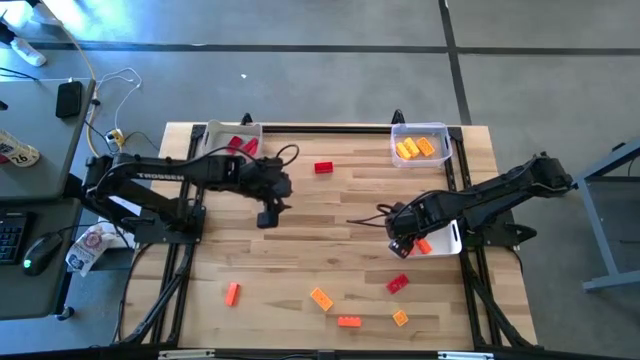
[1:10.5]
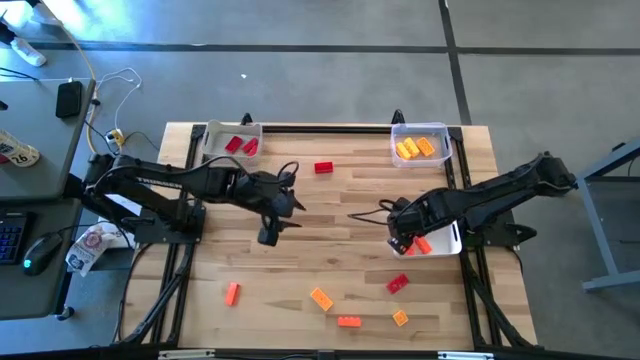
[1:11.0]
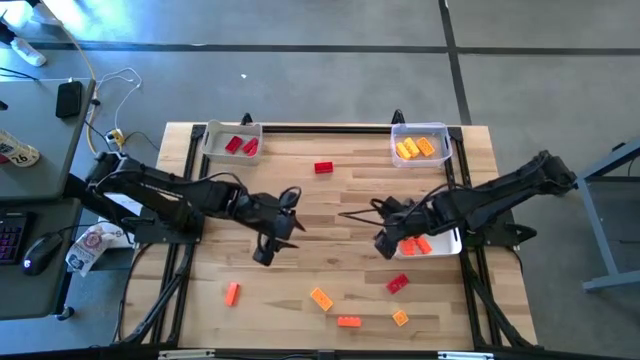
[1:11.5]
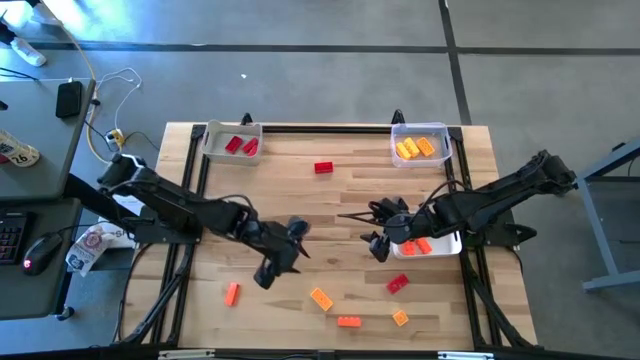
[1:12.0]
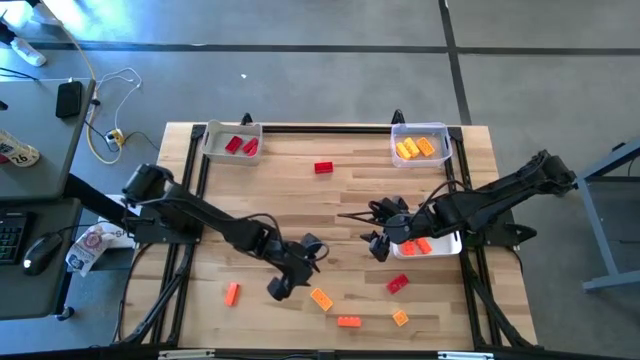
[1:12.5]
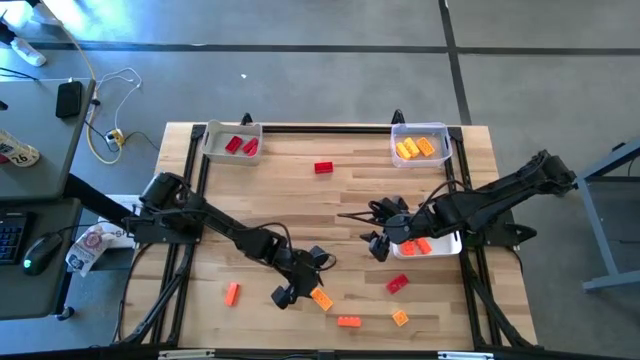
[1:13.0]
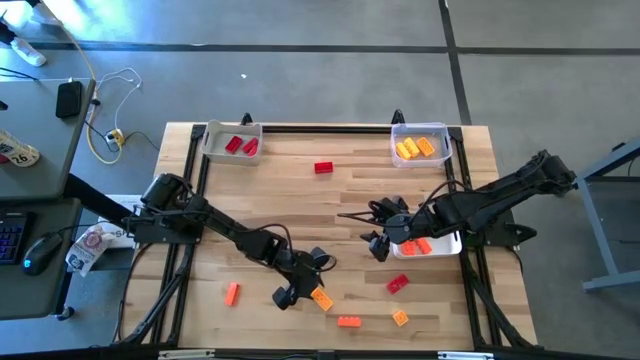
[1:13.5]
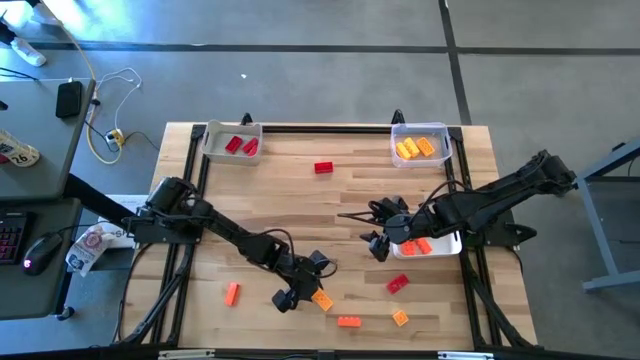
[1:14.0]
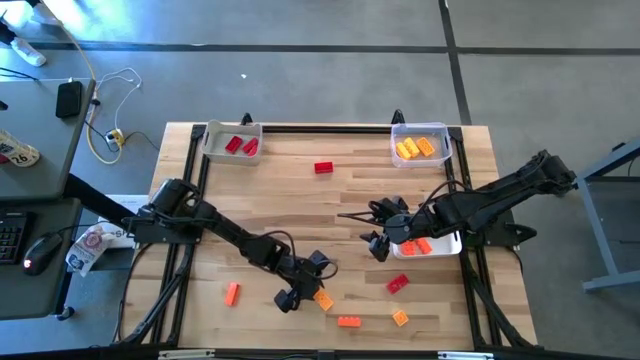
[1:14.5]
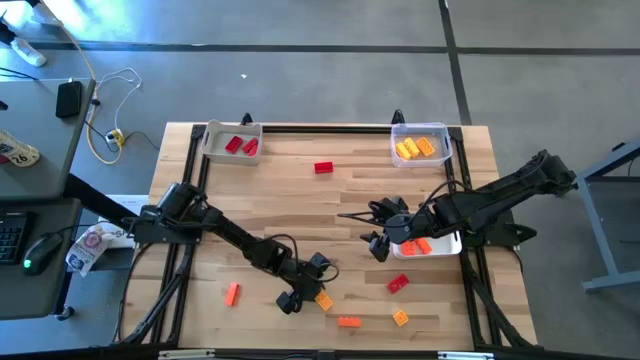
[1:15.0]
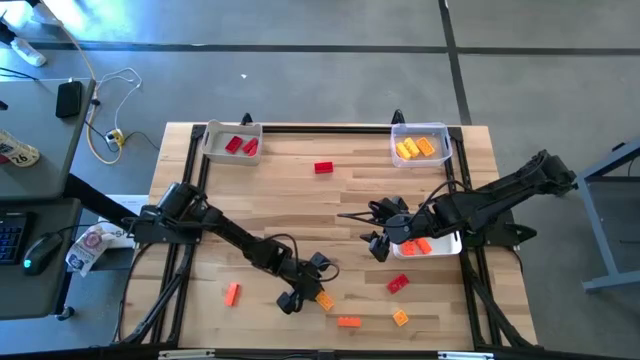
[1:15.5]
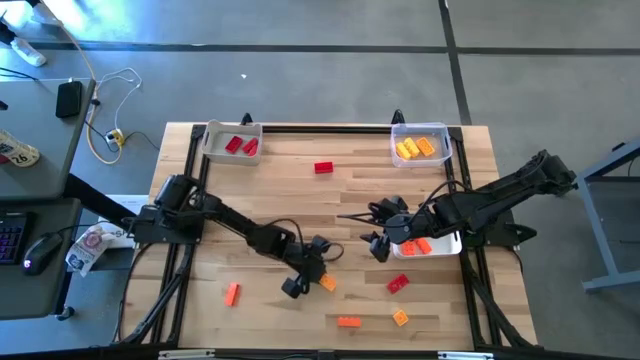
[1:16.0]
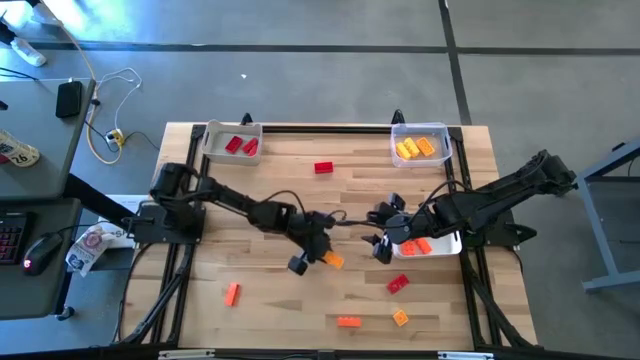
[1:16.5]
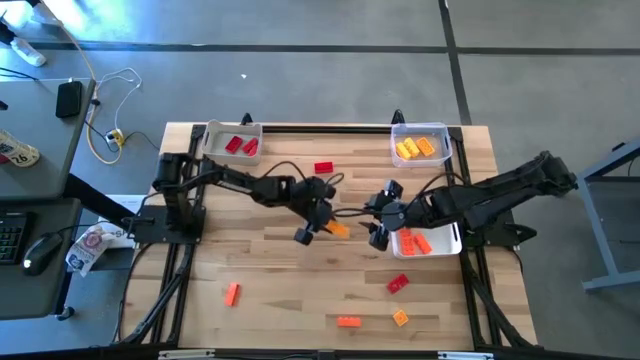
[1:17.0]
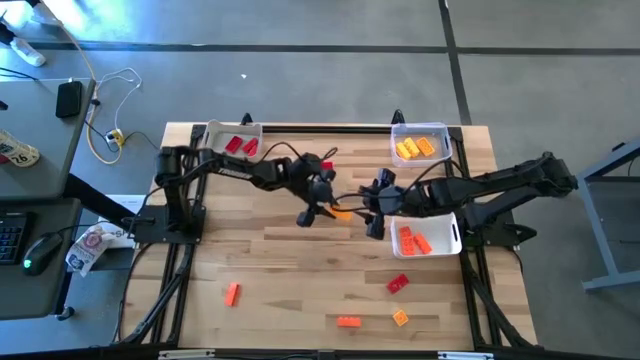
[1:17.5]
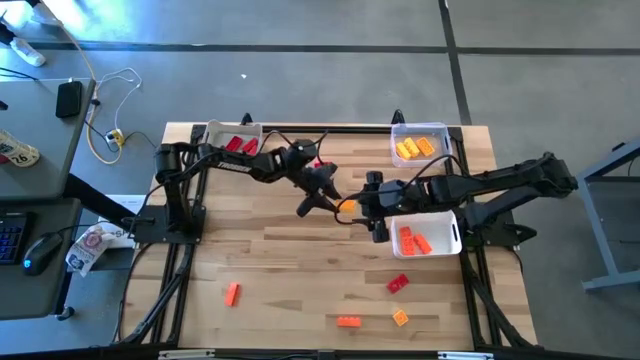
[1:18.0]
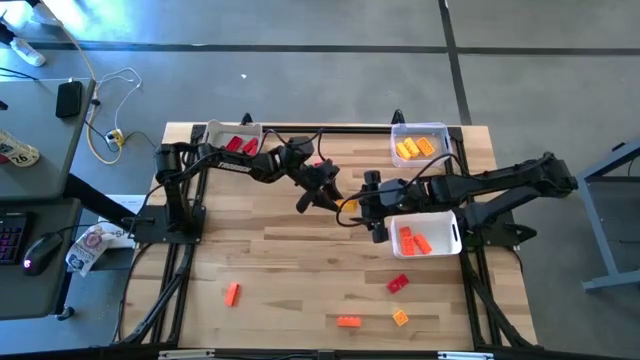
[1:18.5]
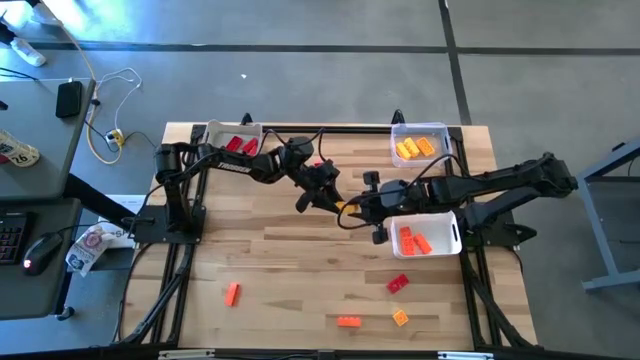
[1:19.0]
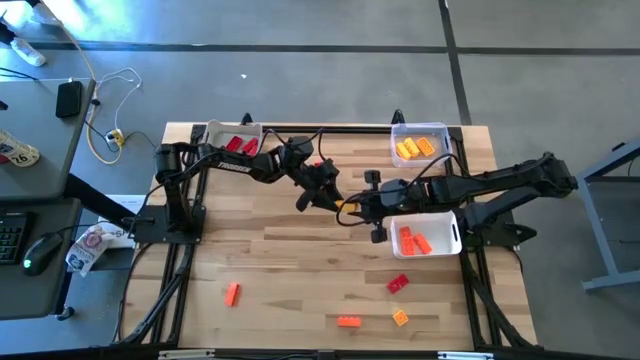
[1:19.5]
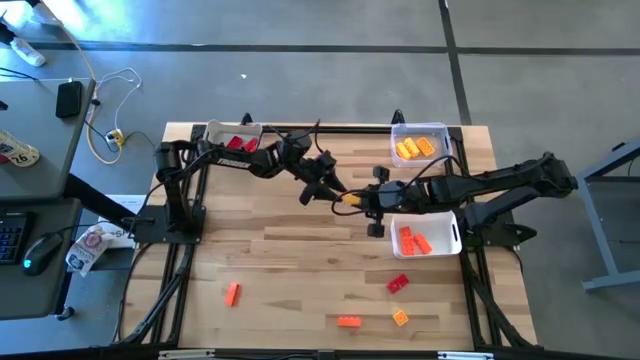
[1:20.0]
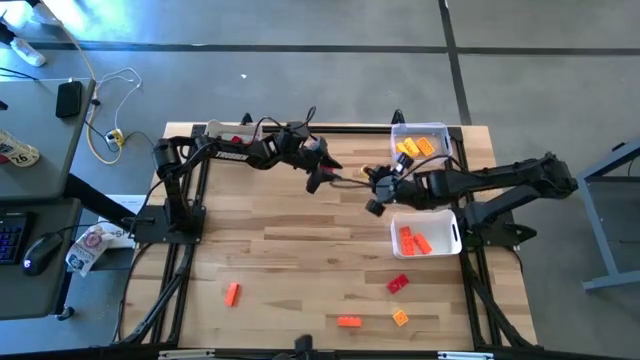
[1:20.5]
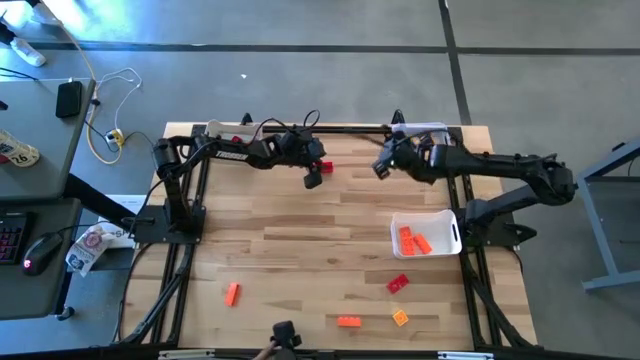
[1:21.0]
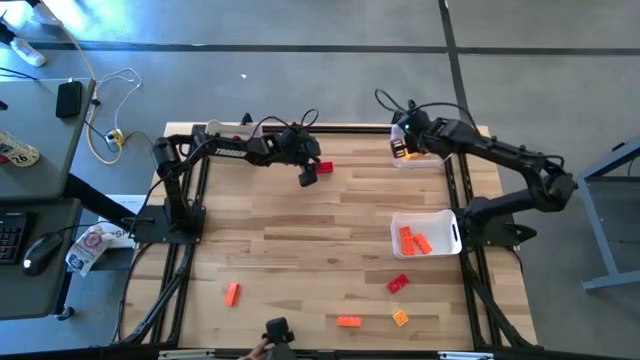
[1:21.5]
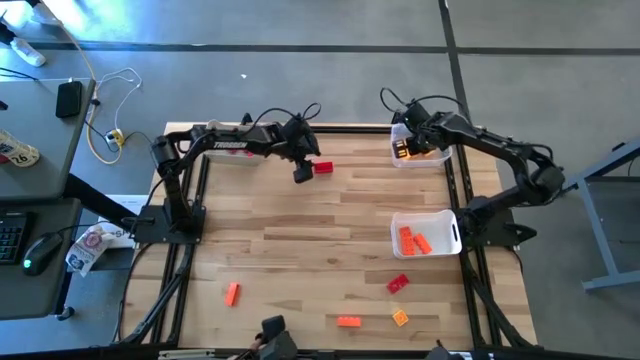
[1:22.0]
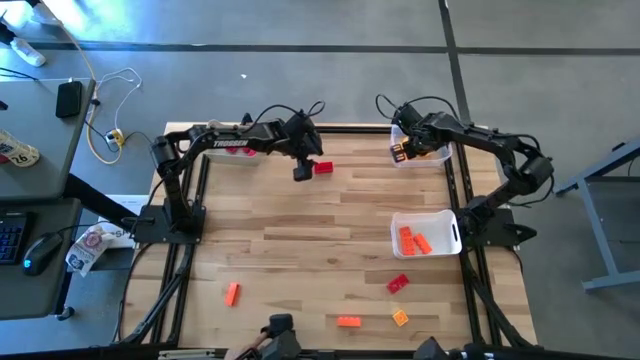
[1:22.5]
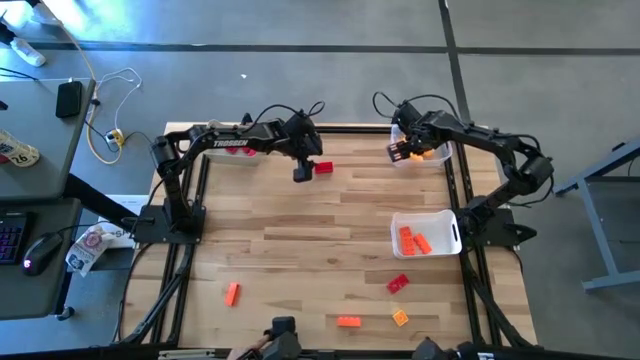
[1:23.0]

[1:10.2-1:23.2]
Task: Sort & place blocks by color
Put the yellow game piece into the transparent bin

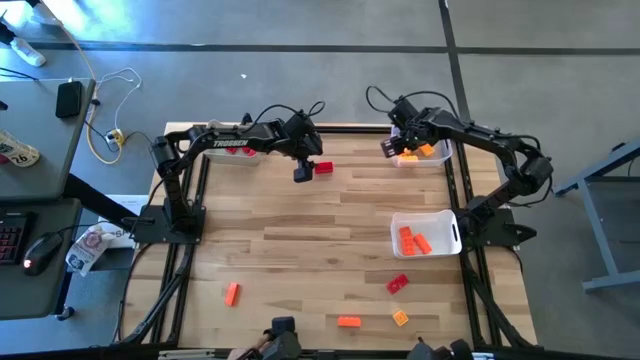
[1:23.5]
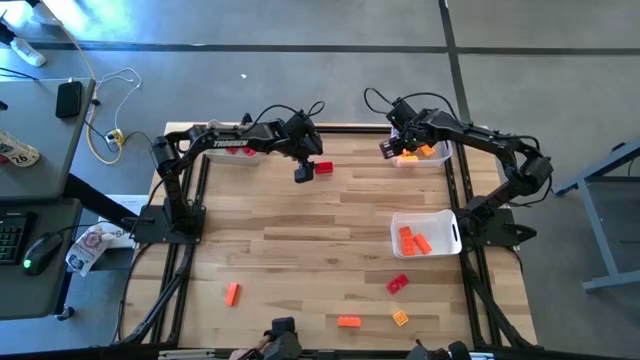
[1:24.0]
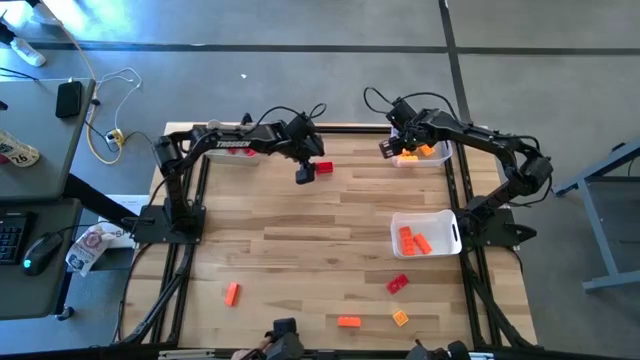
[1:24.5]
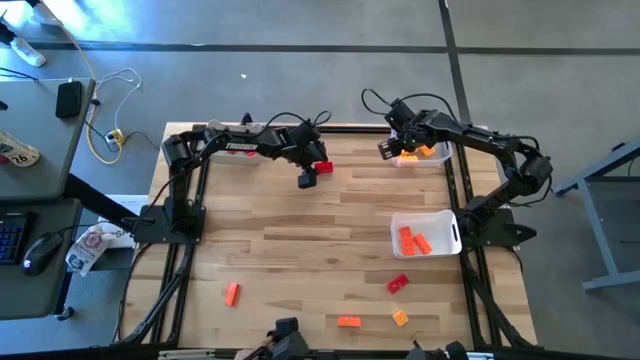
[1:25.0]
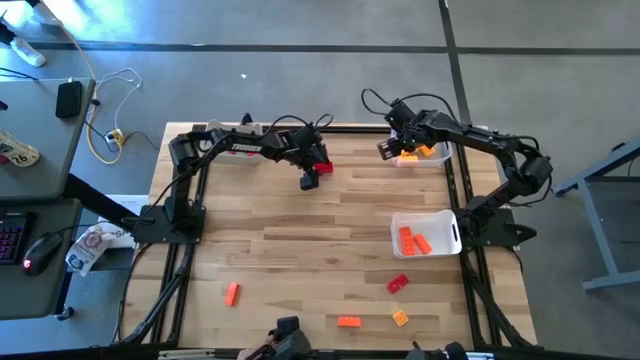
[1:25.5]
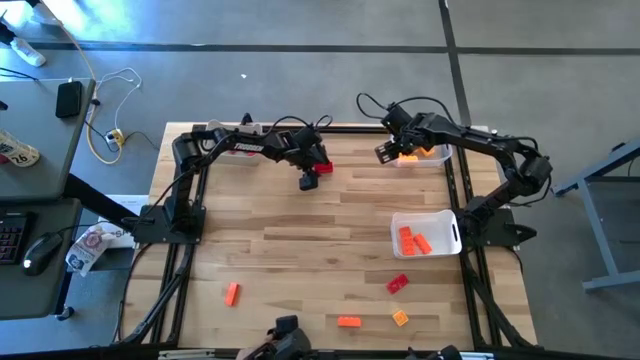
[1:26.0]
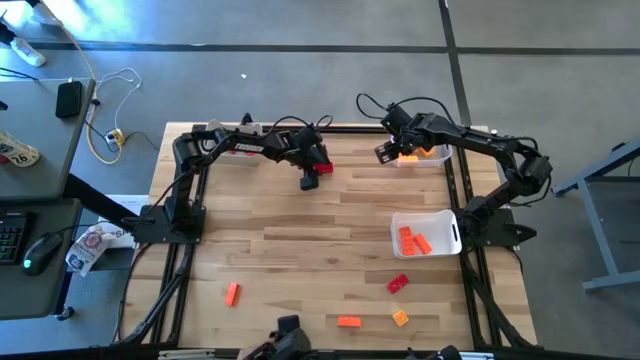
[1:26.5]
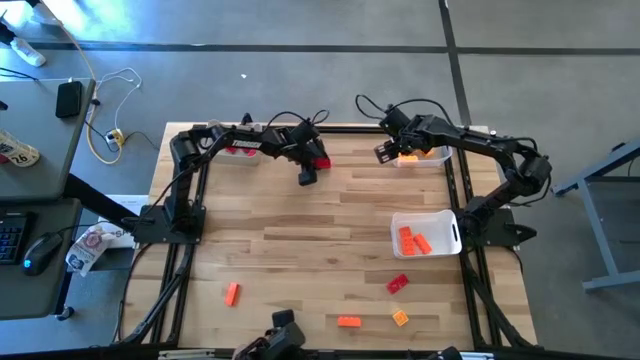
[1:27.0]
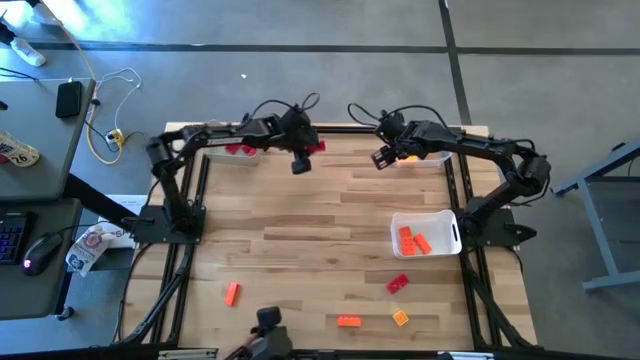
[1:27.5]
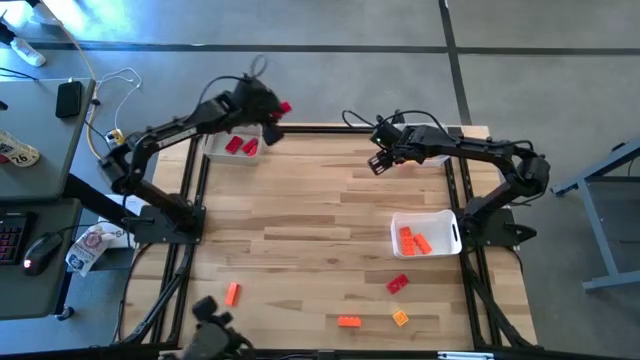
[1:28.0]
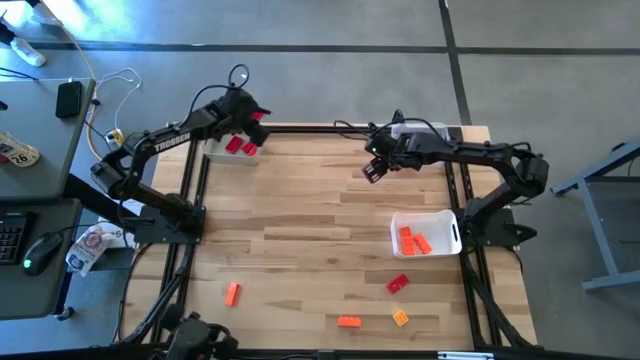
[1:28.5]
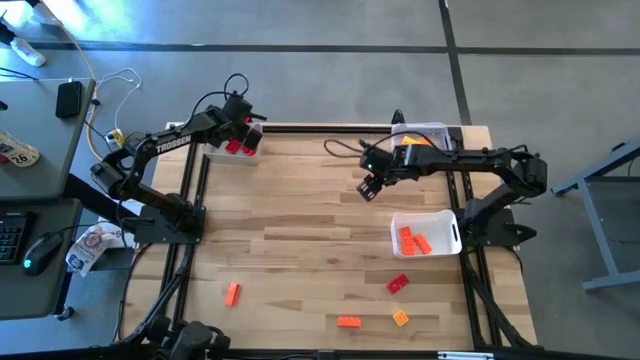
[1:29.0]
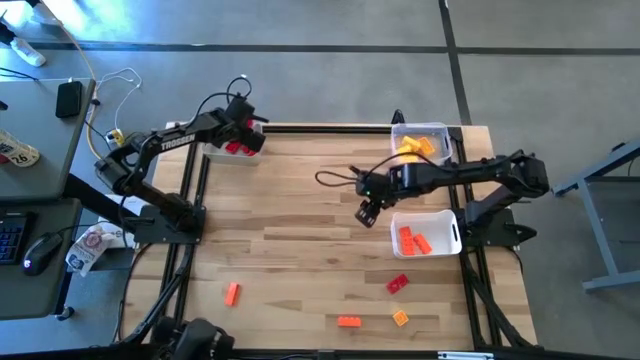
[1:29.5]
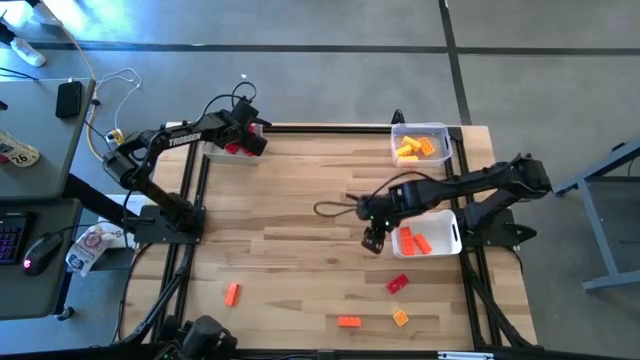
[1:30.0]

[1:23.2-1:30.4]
Put the red game piece into the gray bin

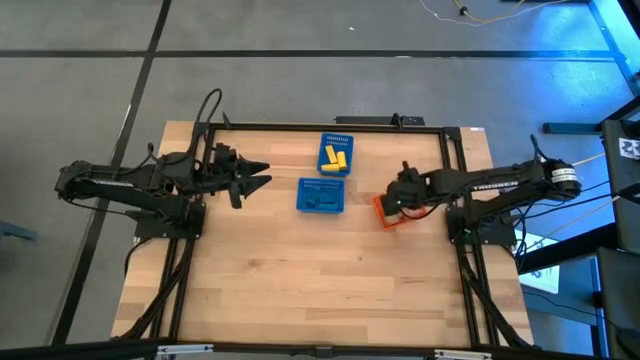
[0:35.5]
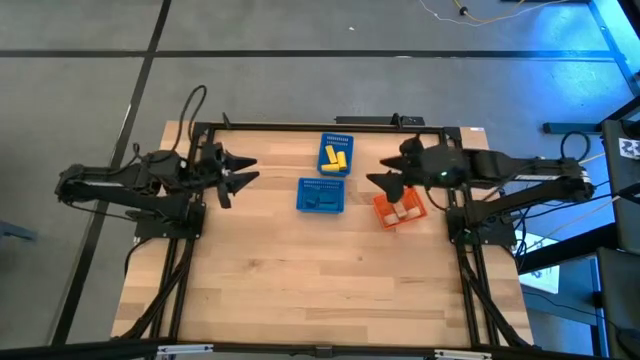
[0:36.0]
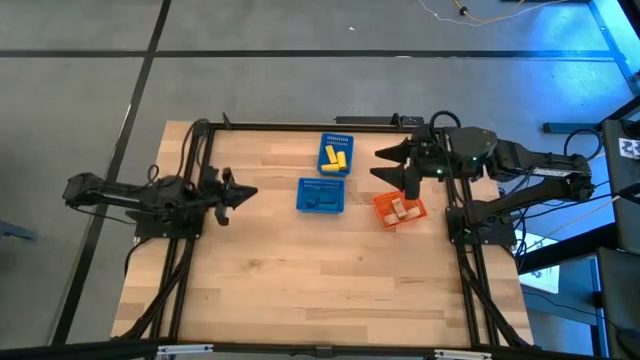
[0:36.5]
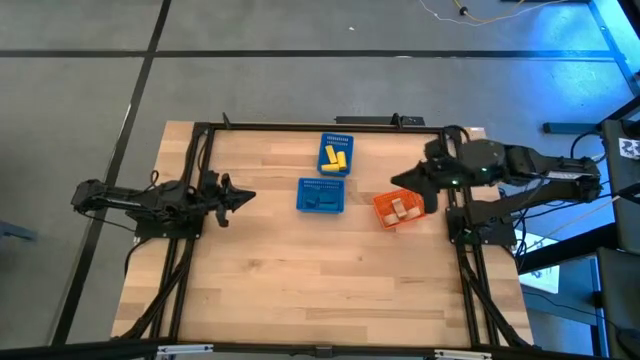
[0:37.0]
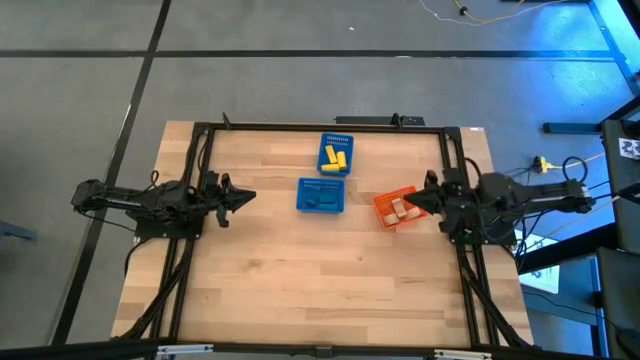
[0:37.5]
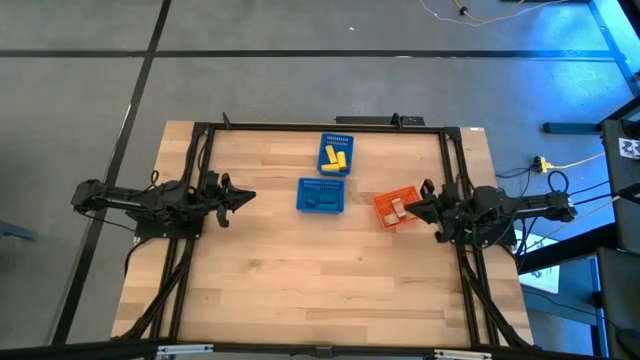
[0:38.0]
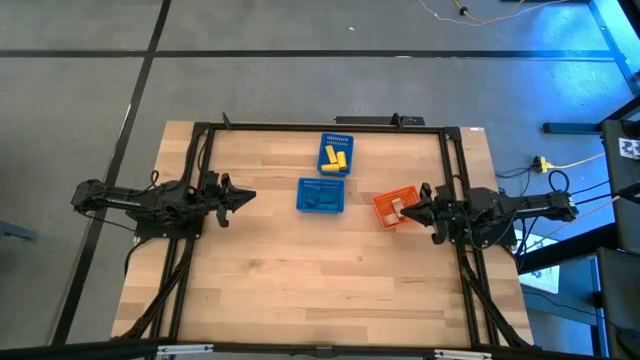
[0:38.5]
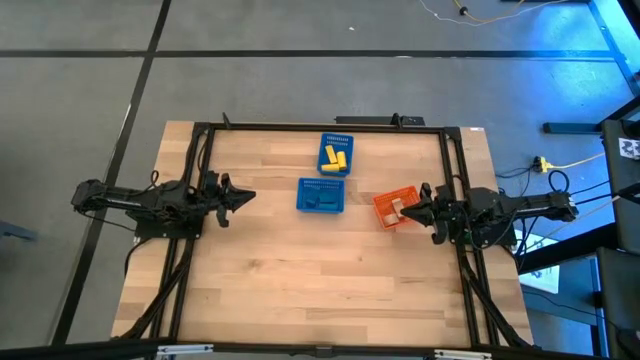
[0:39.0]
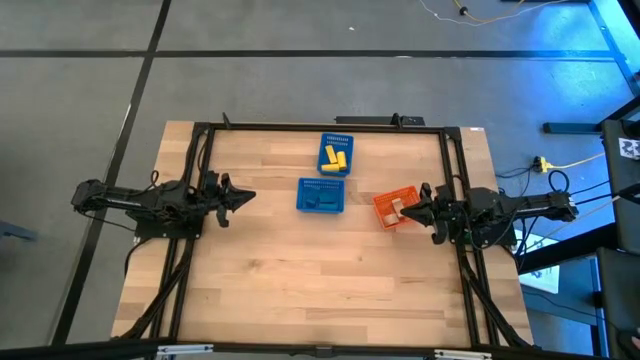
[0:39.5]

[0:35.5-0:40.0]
Task: Sort & place blocks by color
Return to Home Position
